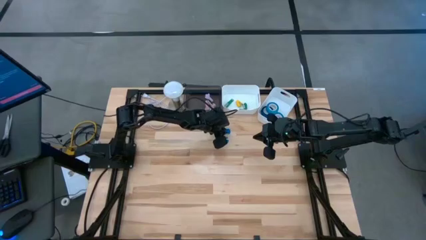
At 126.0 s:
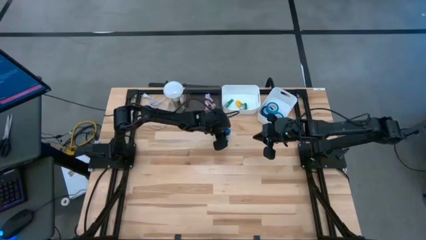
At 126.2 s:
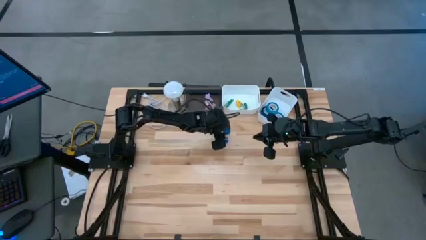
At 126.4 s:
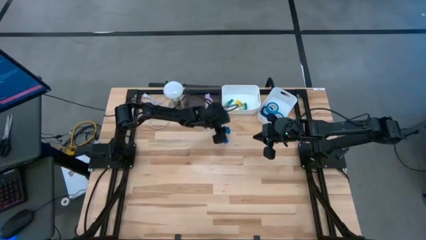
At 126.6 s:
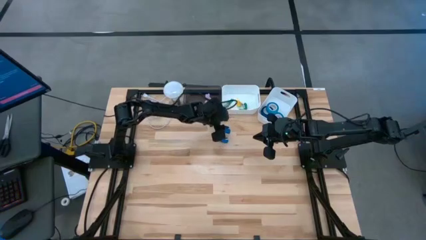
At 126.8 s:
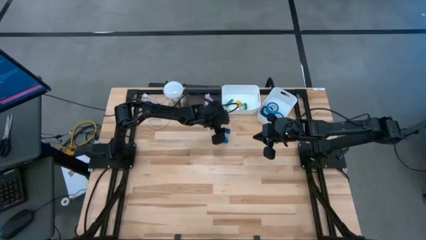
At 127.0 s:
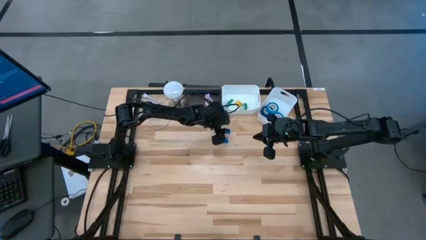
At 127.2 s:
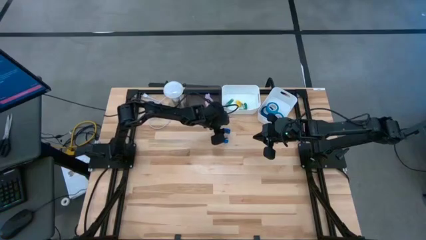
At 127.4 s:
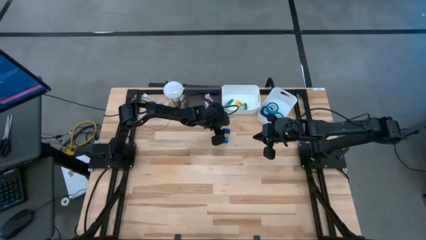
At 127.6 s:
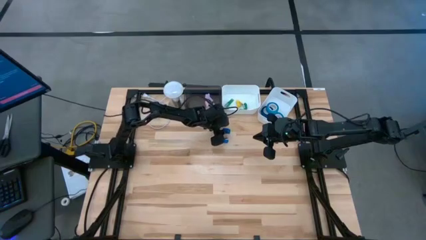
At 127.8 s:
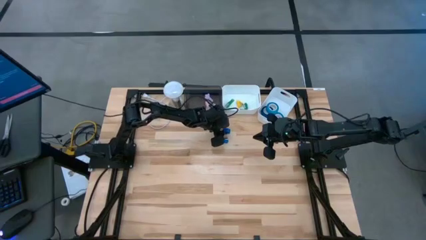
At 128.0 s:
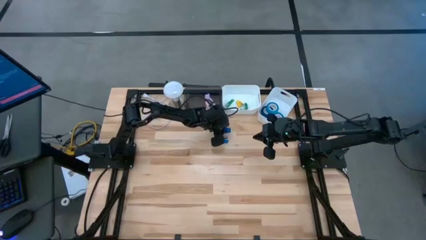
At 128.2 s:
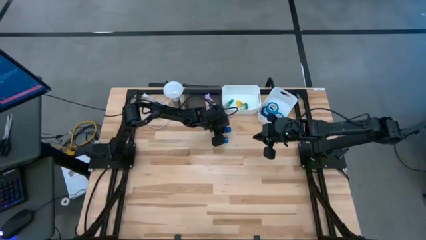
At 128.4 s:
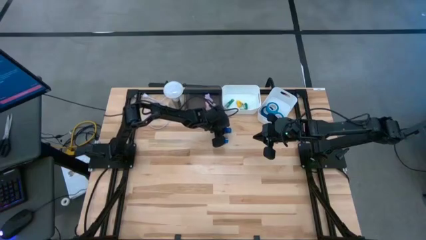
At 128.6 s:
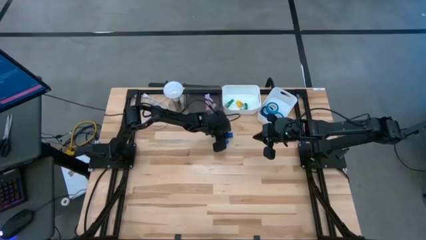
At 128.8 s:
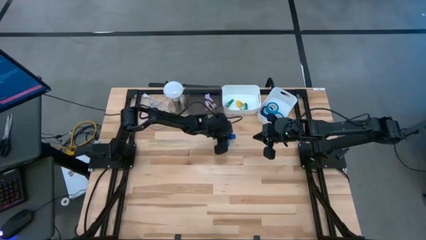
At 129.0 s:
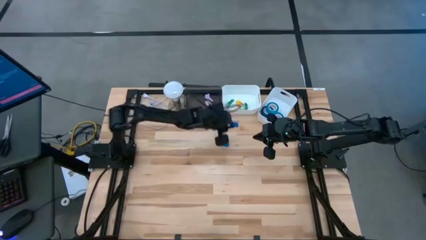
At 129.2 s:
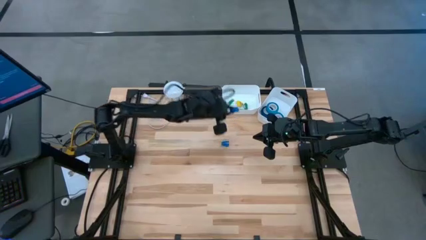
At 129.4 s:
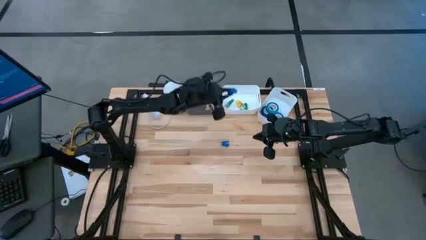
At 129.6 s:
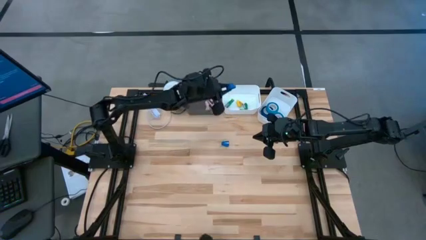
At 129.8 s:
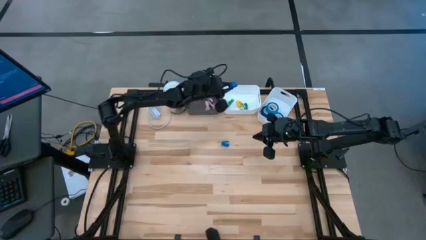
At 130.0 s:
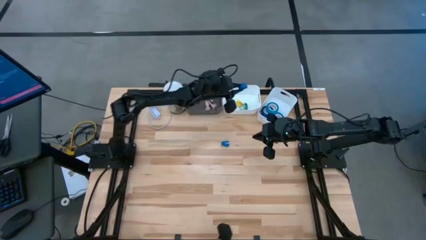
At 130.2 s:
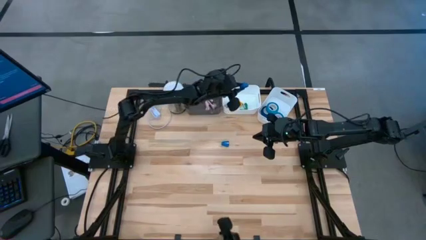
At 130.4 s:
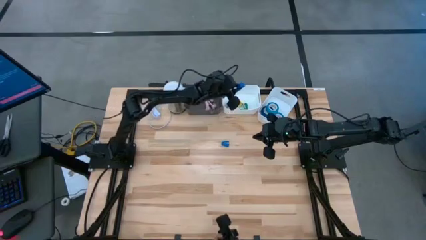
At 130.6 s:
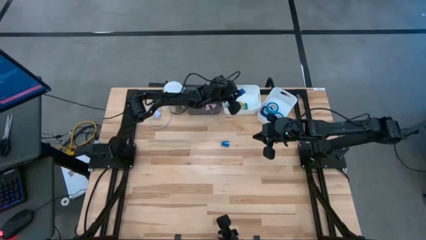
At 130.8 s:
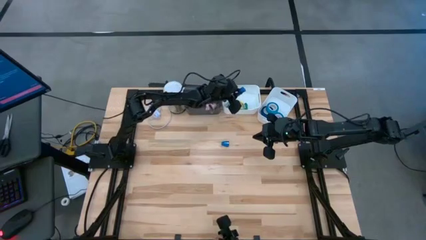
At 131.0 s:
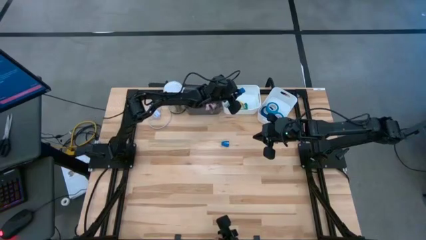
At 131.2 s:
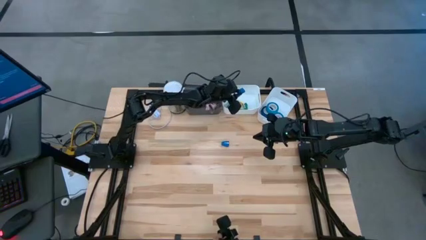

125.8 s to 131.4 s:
Task: Pick and place Stapler, Stapler remover, tape
Put the top blue stapler into the left white bin

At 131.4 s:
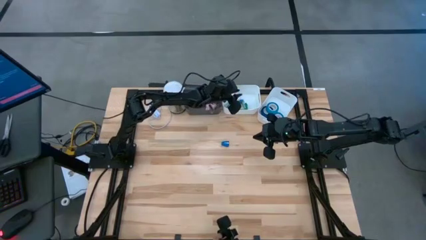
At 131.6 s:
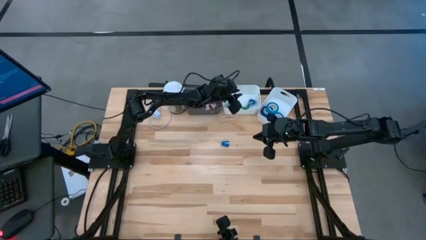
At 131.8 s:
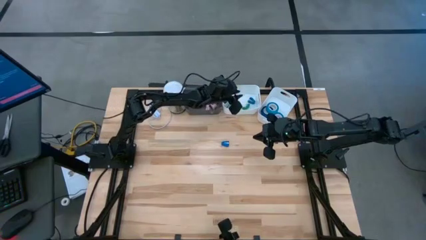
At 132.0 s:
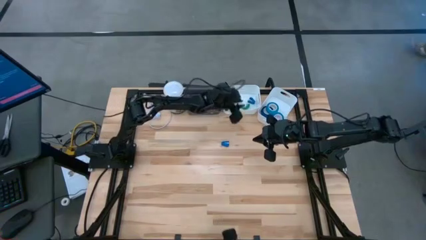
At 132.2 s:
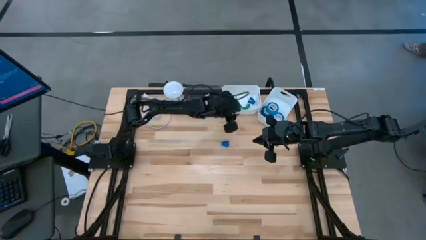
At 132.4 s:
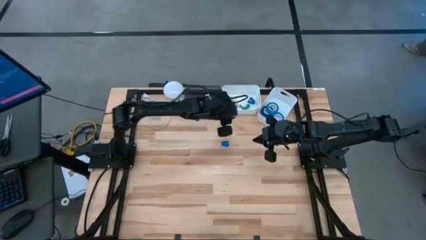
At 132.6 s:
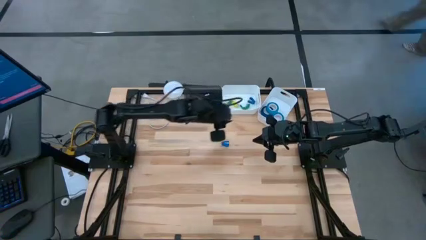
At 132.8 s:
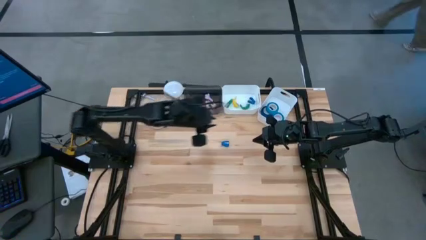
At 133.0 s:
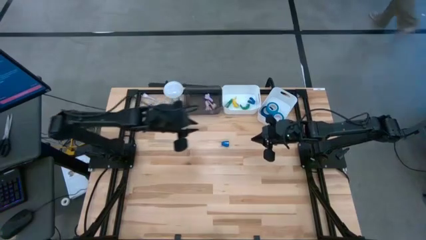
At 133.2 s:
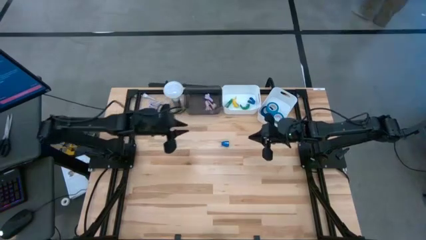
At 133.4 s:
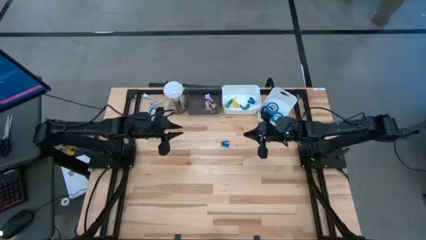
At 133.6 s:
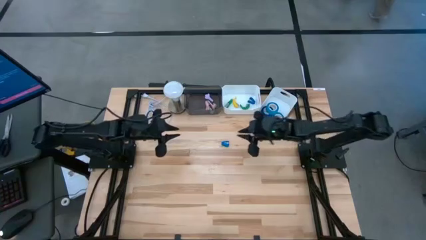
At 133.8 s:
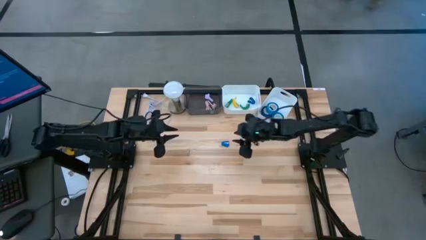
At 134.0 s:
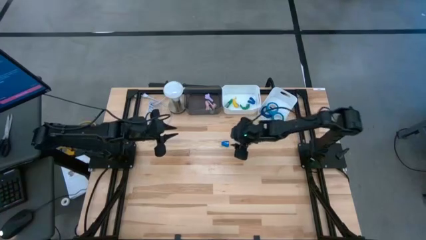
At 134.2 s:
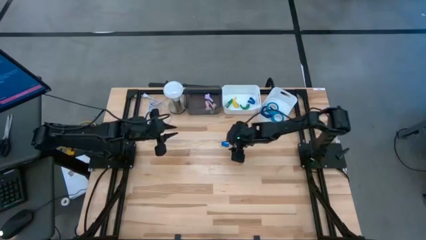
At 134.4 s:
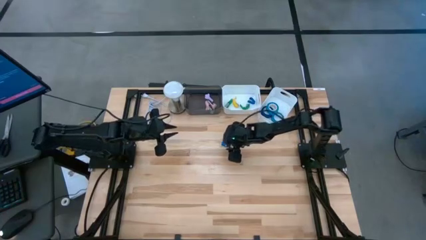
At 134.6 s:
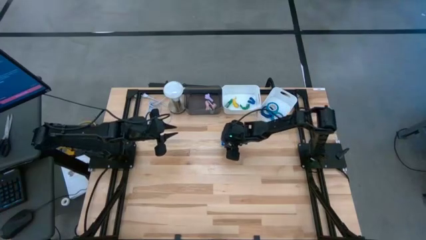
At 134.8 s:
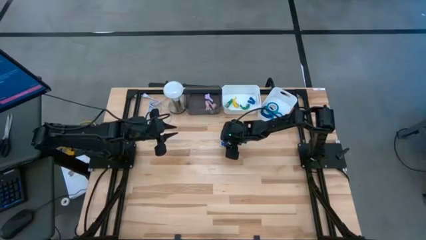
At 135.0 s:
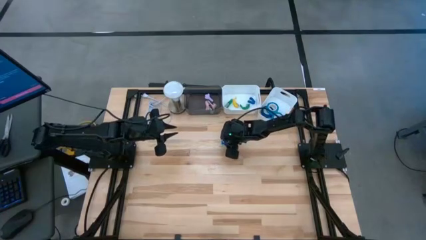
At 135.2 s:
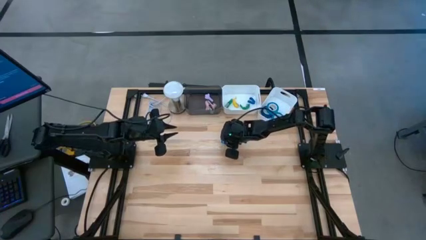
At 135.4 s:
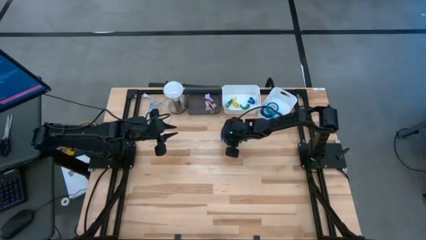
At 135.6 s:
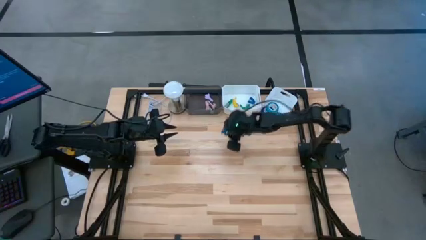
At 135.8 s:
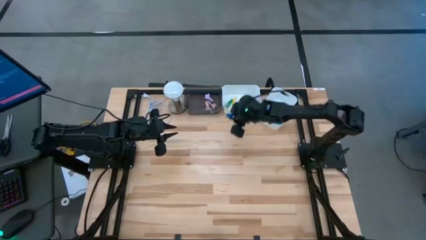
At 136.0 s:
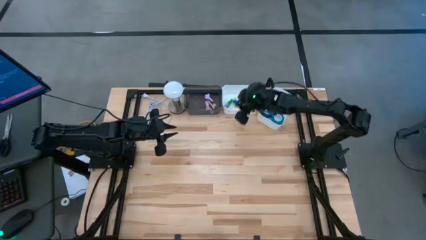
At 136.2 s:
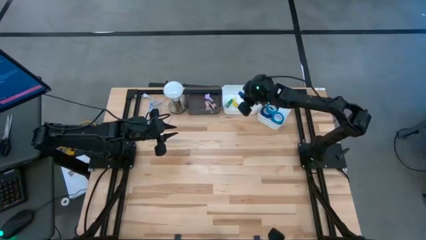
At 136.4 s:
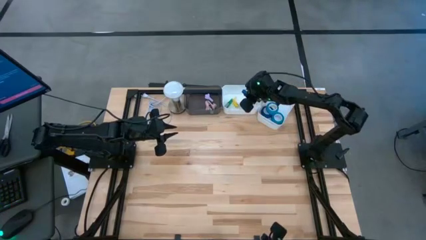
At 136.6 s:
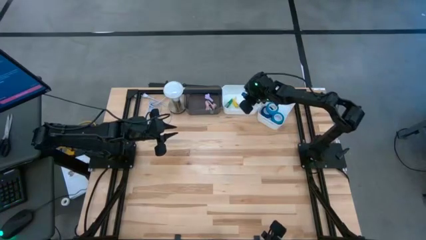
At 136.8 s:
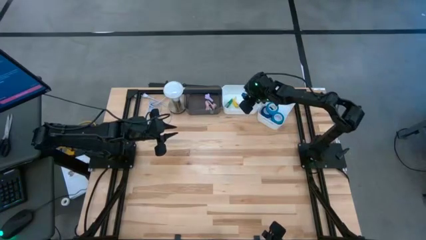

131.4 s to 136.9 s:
Put the blue stapler into the left white bin

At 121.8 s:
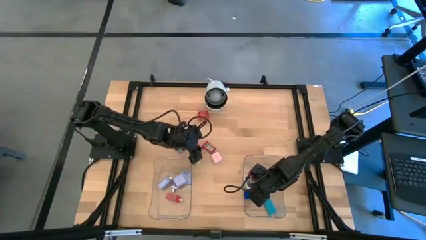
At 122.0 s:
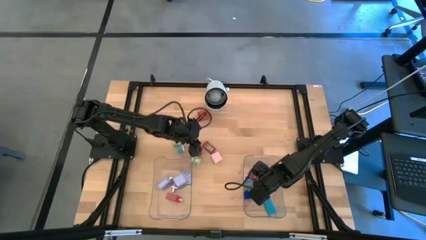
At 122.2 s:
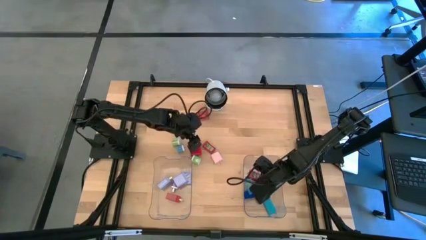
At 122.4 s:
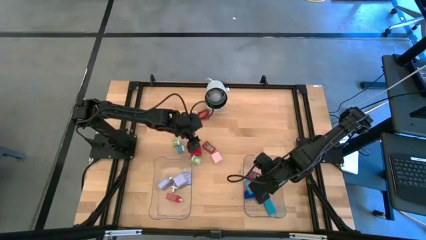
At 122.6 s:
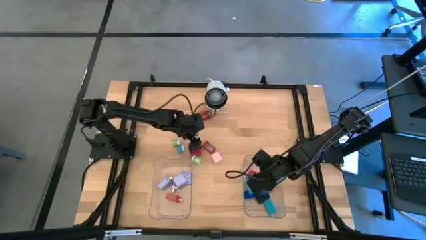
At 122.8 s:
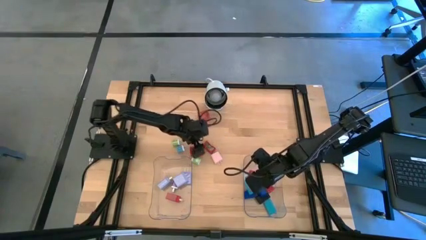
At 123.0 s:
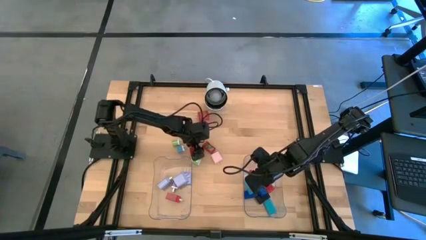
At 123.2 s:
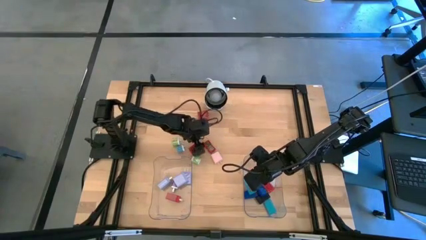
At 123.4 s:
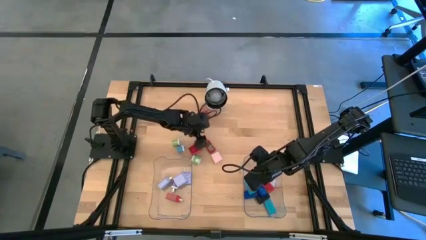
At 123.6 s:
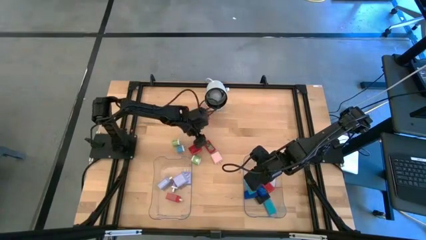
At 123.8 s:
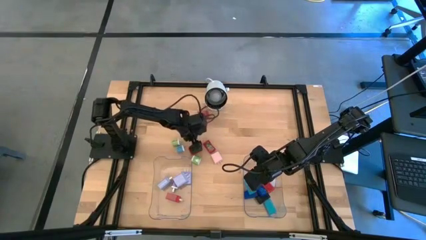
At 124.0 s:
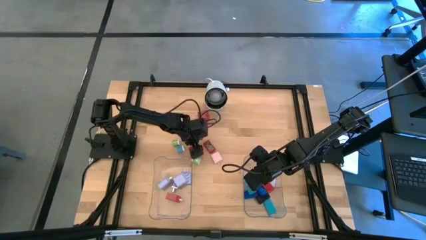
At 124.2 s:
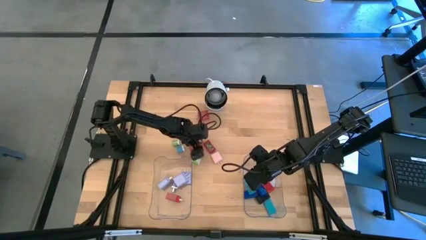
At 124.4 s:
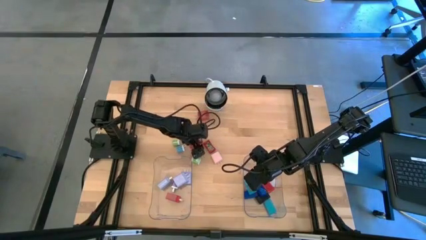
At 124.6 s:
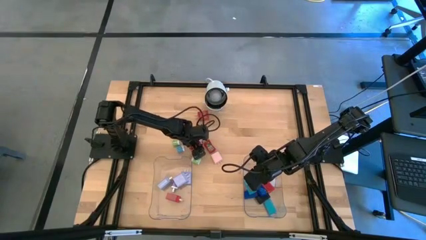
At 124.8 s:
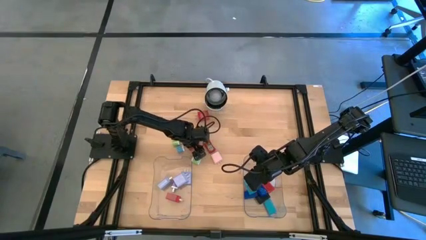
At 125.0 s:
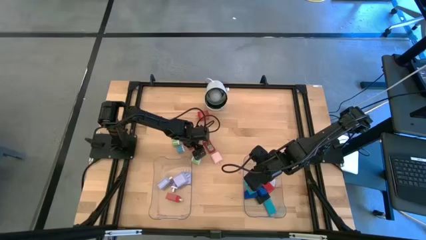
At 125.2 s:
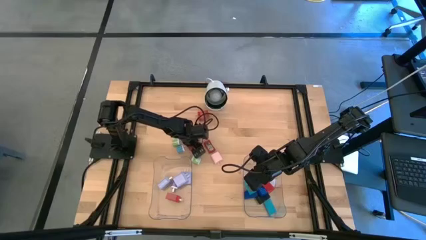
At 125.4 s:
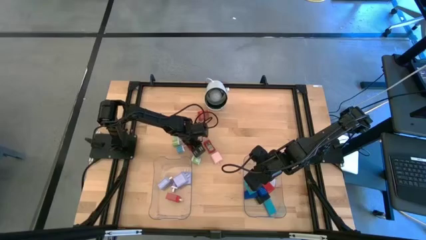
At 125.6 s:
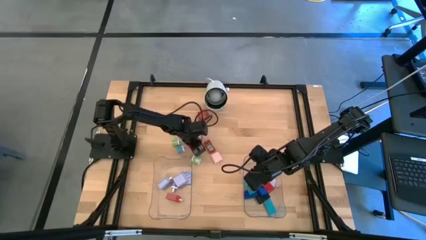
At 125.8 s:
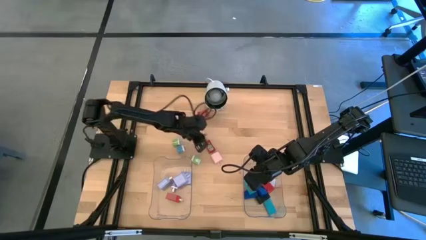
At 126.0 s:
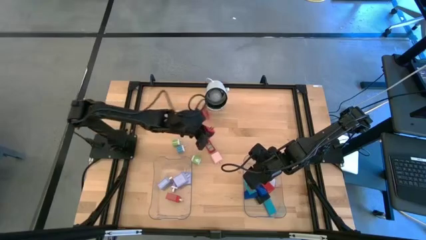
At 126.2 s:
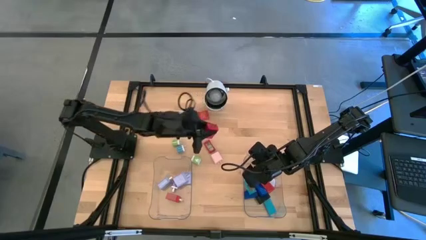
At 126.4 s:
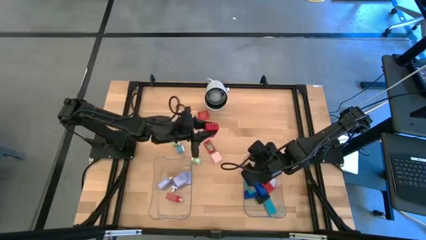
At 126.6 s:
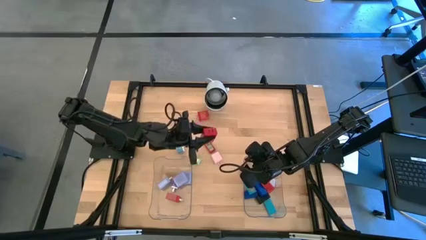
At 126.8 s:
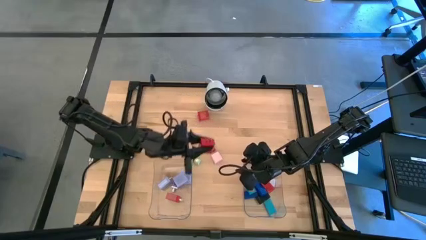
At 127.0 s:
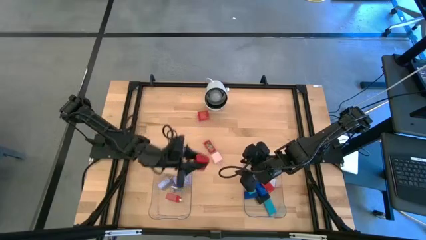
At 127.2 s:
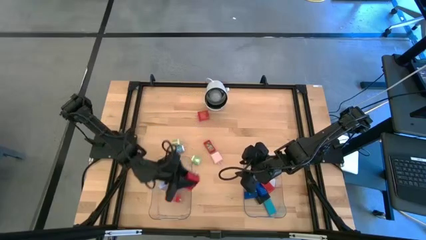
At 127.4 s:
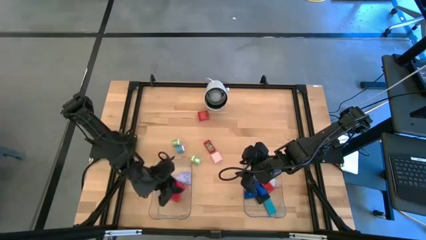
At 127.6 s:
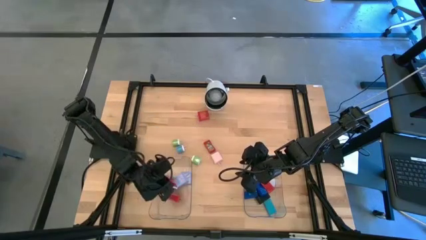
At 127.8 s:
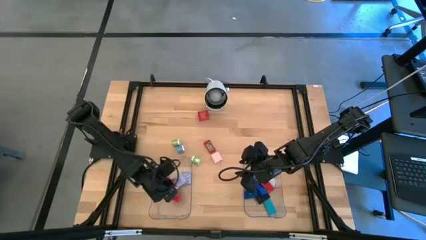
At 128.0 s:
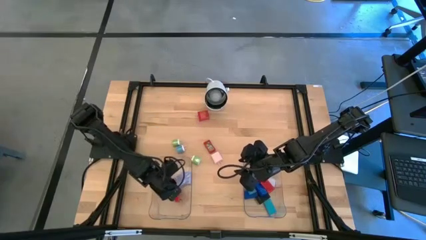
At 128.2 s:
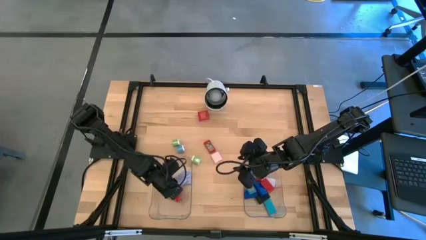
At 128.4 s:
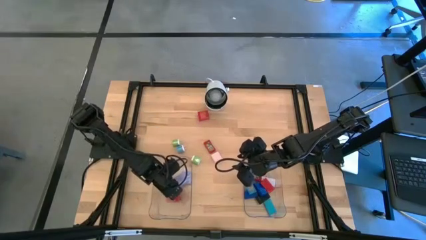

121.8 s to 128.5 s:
Task: Pick & Place Office items
Put the bottom red charger adapter into the left transparent bin
